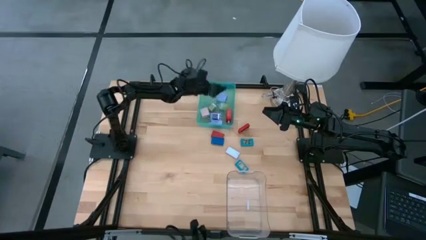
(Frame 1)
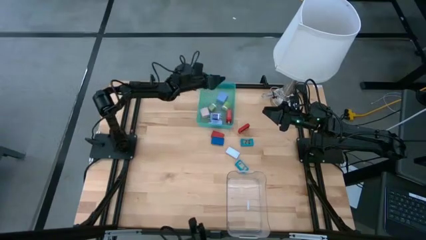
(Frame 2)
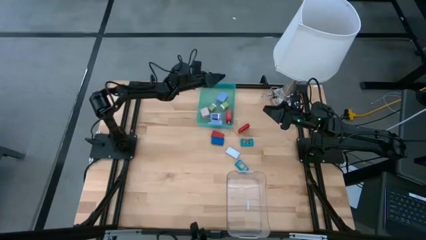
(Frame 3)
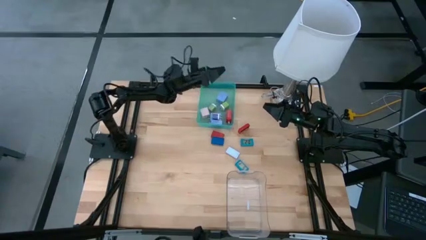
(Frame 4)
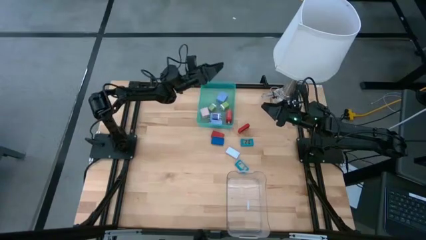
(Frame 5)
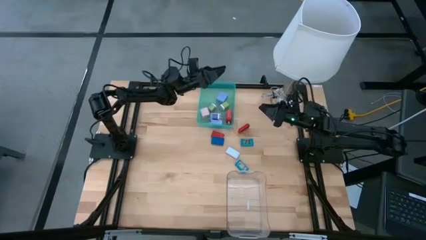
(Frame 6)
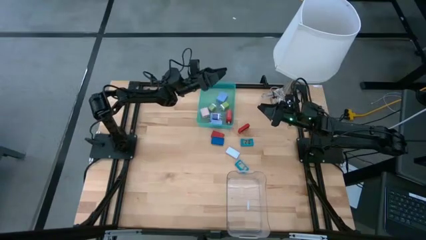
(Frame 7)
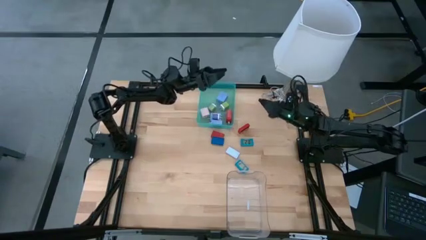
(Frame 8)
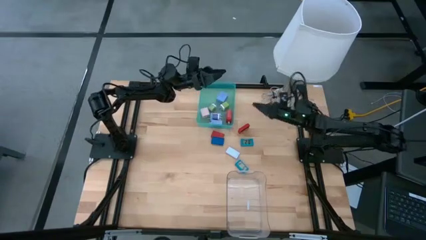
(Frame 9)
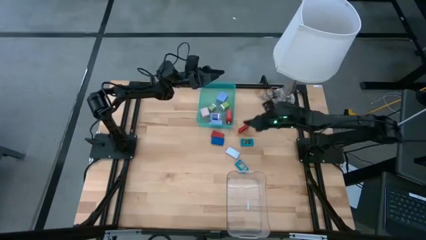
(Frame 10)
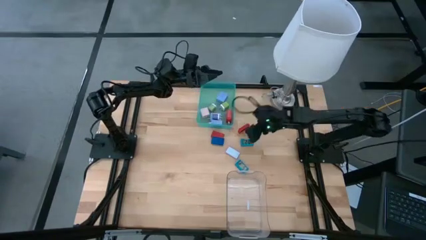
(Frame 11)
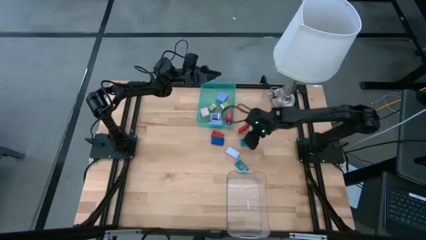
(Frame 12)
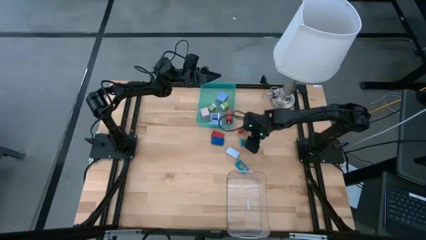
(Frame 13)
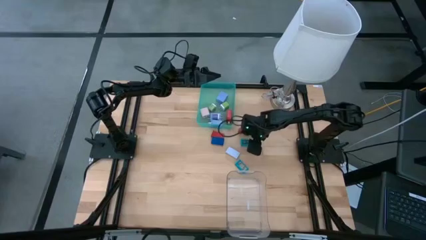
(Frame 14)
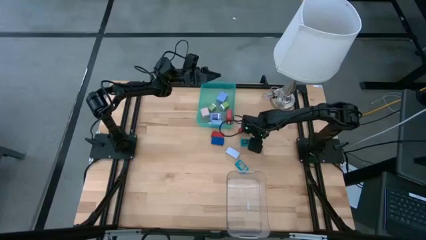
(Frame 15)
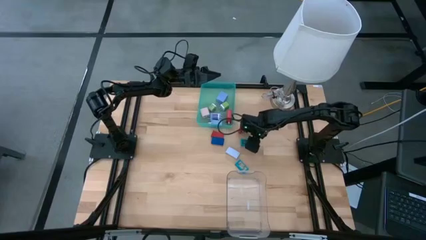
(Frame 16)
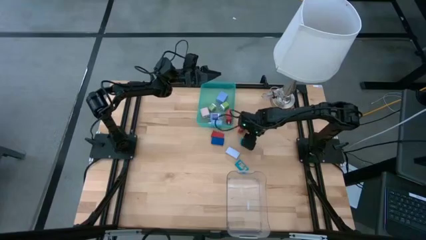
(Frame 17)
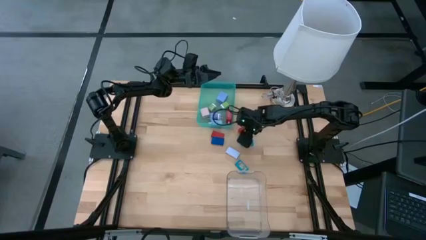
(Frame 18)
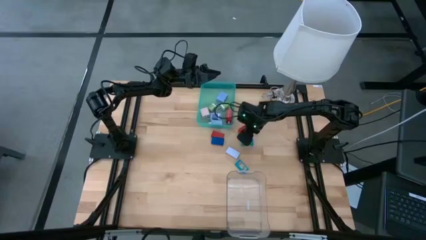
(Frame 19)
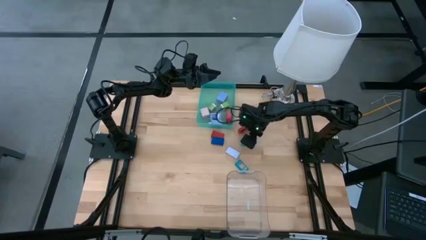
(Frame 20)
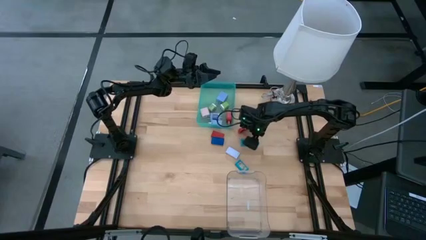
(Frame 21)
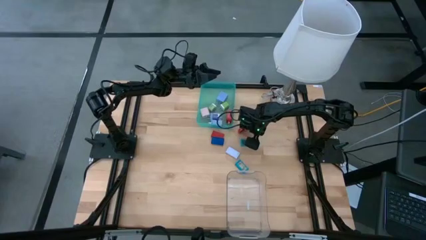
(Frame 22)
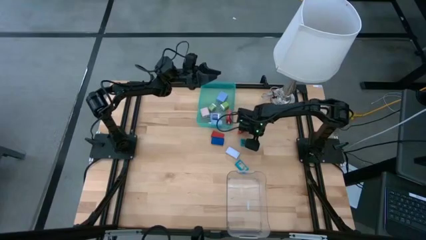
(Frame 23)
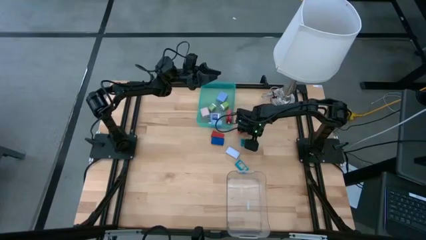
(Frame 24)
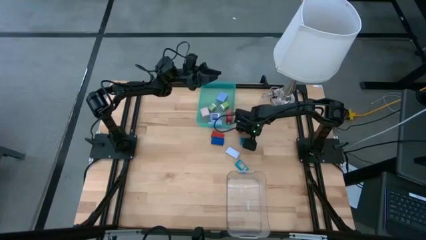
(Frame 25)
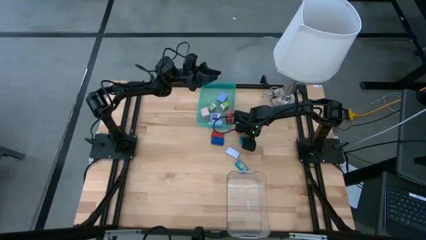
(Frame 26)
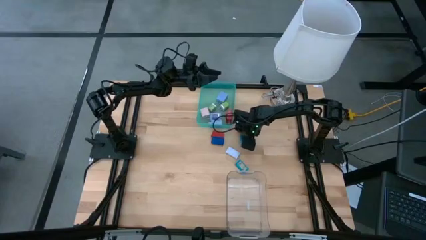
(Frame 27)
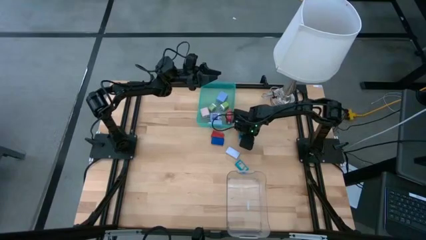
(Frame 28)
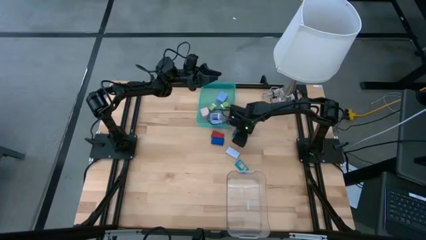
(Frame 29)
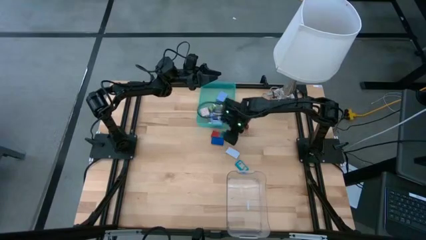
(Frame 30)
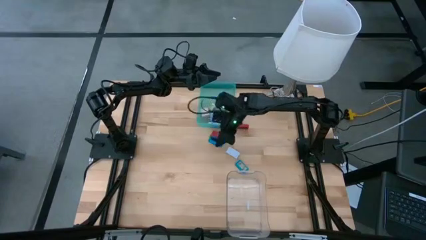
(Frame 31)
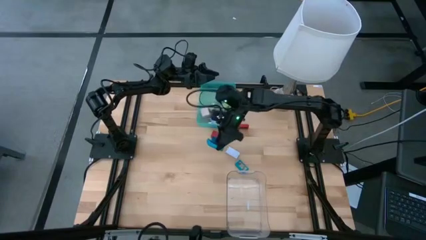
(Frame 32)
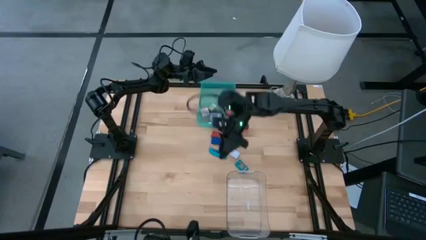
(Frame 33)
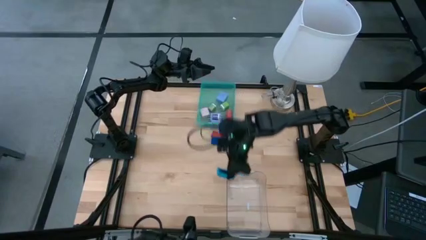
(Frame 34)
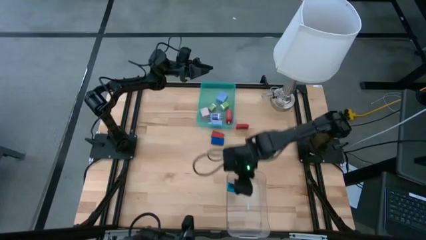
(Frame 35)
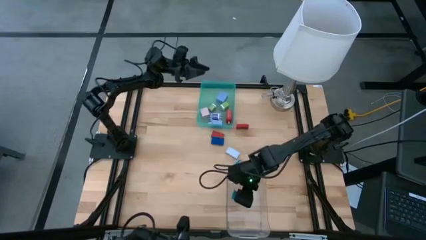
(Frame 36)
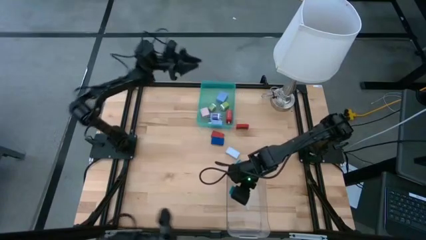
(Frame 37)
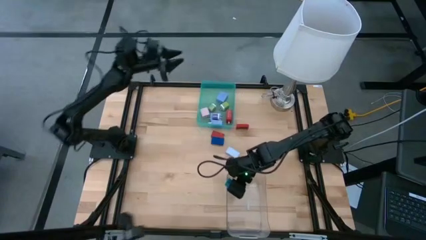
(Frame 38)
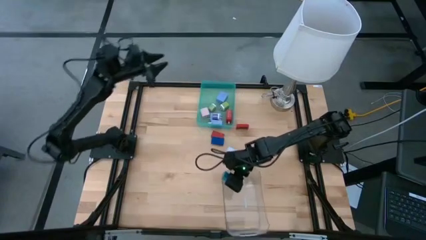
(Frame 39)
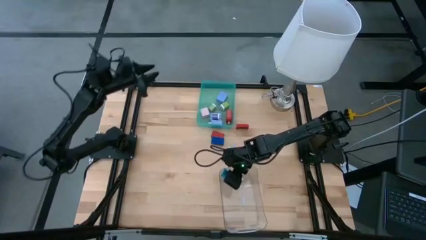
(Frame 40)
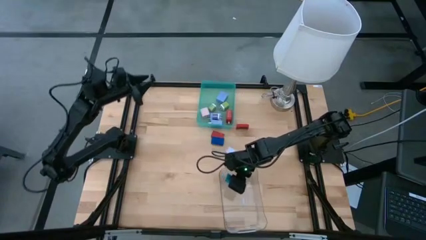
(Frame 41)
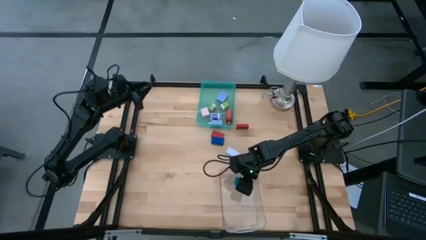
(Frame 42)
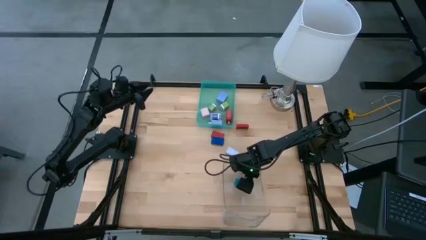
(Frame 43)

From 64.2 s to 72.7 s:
Task: Pick & Place Office items
Put the top blue digital timer into the transparent bin

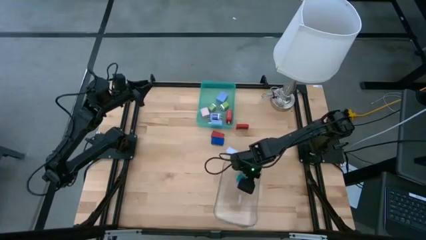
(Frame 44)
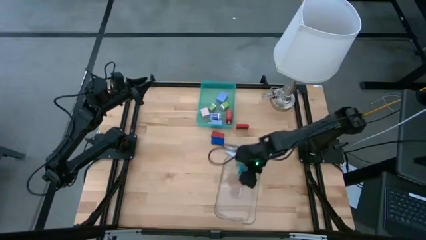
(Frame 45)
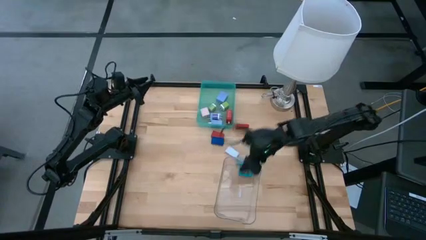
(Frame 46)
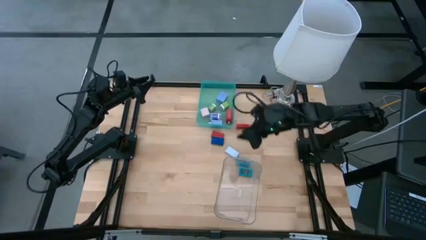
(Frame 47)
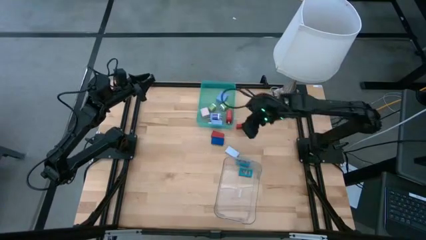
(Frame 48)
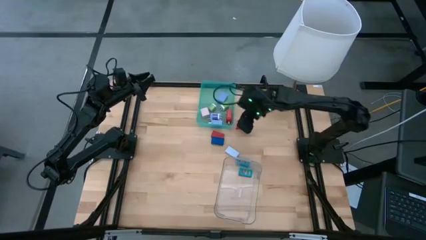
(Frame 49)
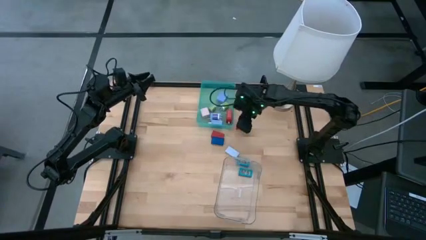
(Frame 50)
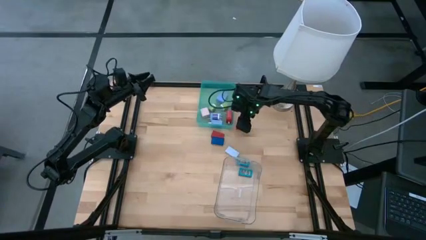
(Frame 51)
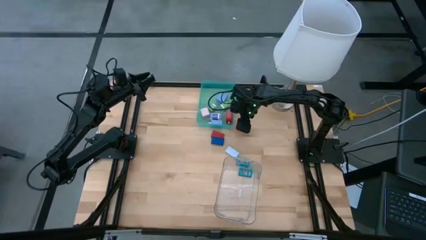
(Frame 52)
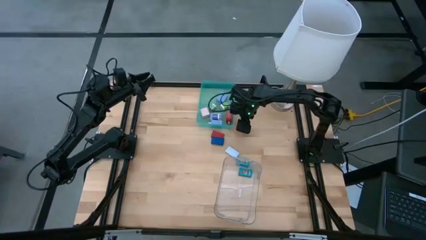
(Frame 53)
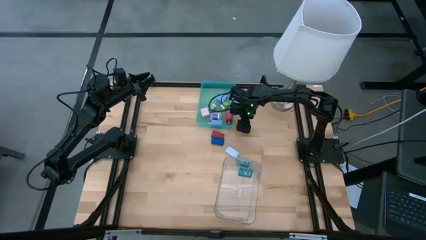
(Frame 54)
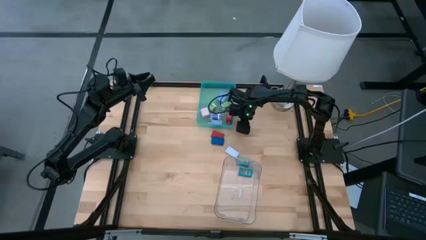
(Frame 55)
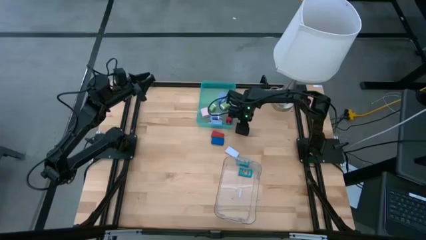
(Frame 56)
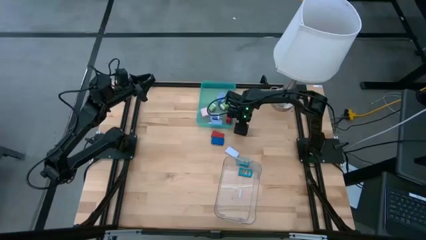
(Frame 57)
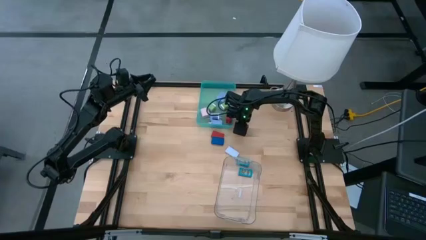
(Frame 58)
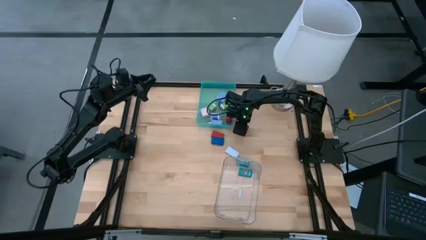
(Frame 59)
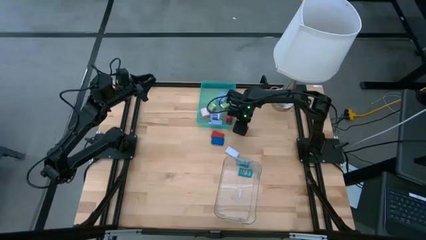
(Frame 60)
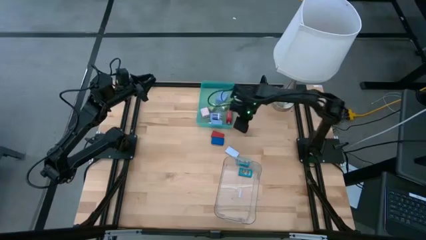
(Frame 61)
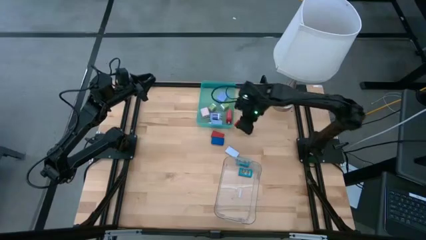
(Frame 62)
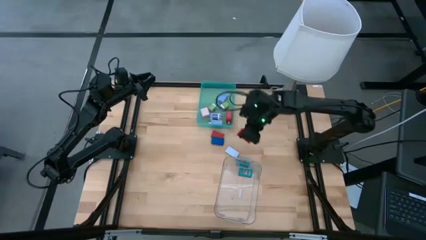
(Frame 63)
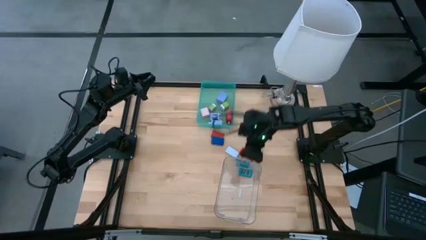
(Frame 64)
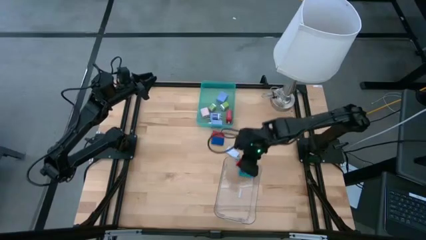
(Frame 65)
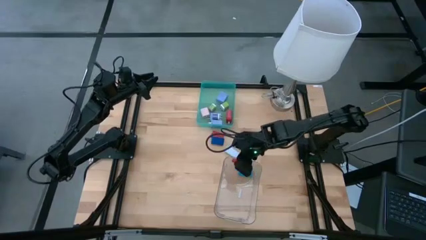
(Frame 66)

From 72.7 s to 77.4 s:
Put the top red digital timer into the transparent bin

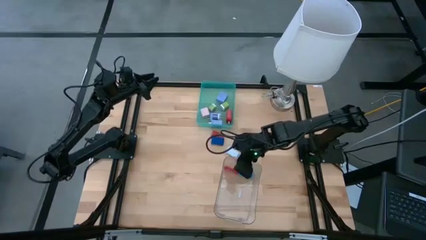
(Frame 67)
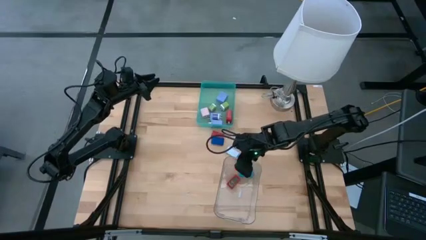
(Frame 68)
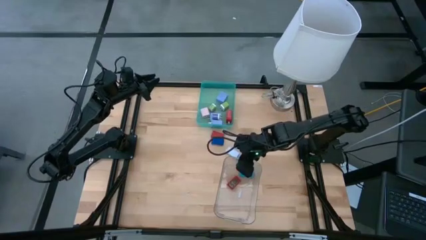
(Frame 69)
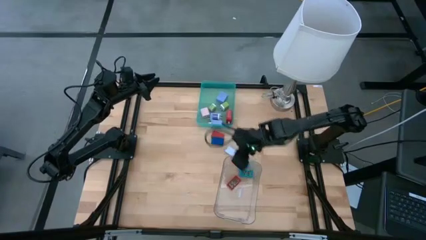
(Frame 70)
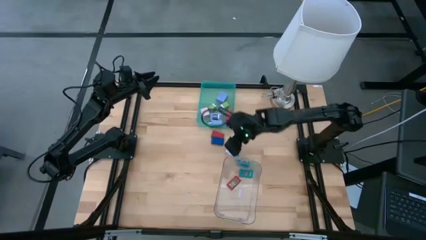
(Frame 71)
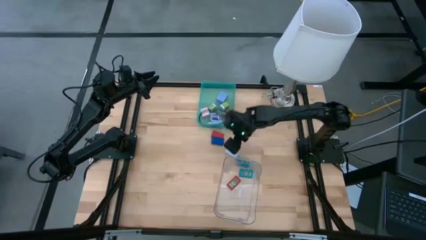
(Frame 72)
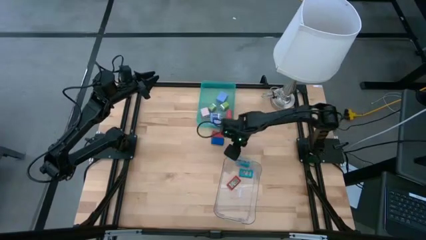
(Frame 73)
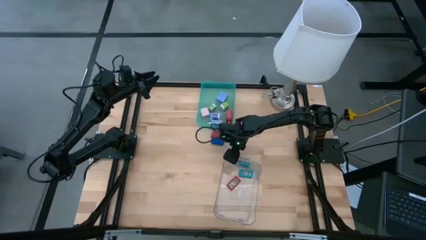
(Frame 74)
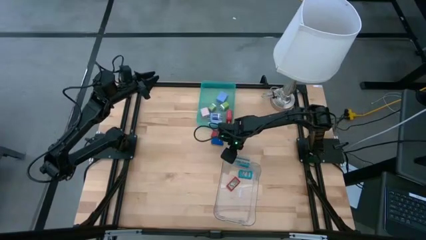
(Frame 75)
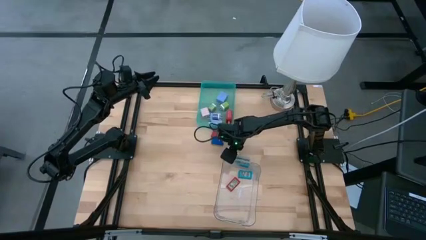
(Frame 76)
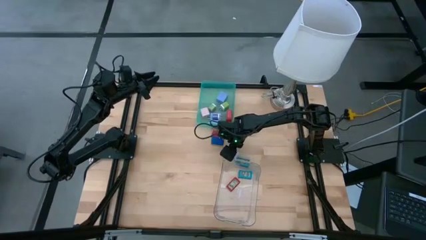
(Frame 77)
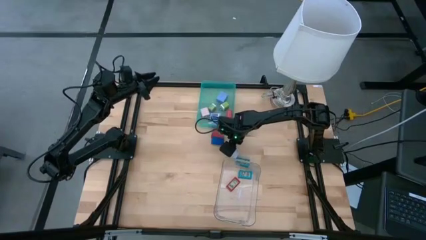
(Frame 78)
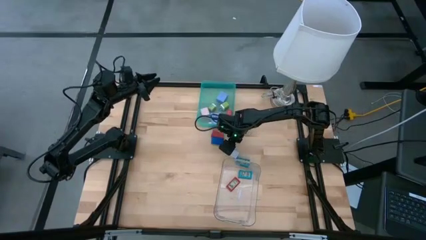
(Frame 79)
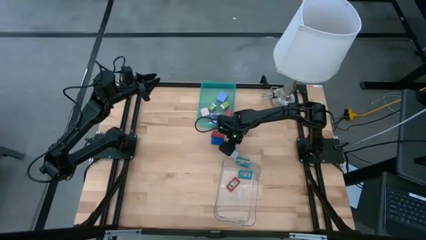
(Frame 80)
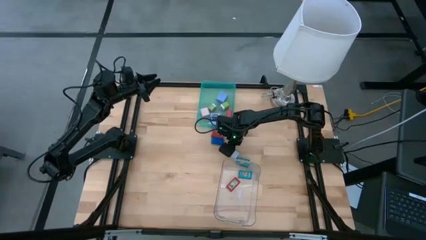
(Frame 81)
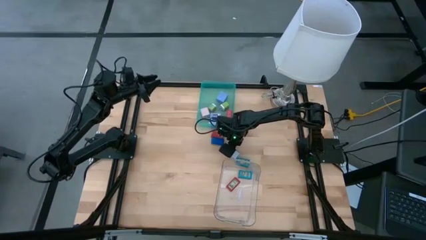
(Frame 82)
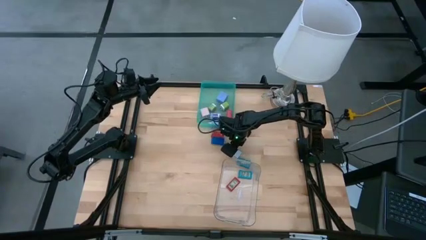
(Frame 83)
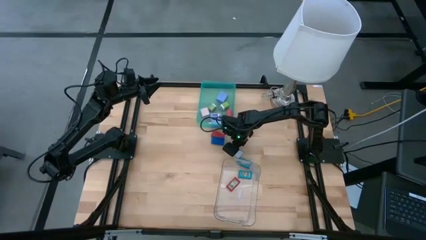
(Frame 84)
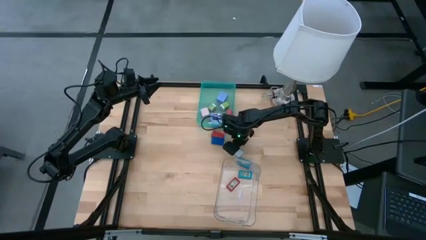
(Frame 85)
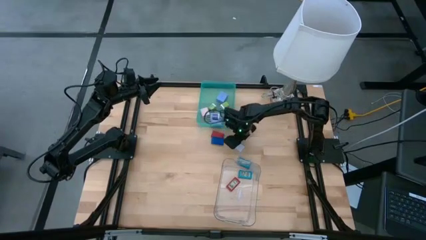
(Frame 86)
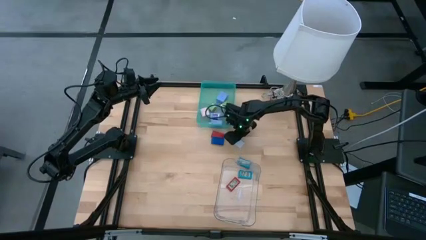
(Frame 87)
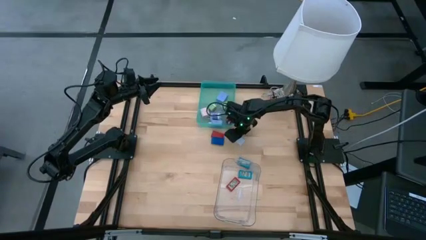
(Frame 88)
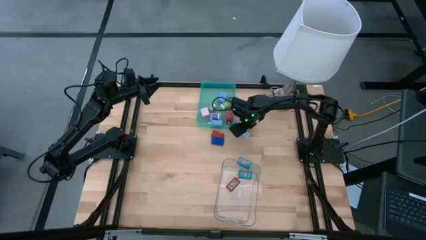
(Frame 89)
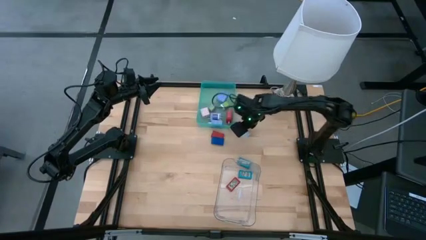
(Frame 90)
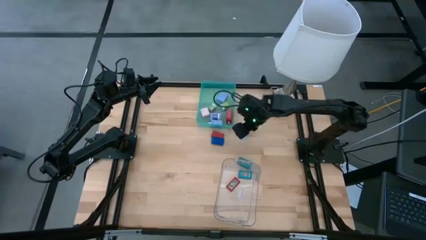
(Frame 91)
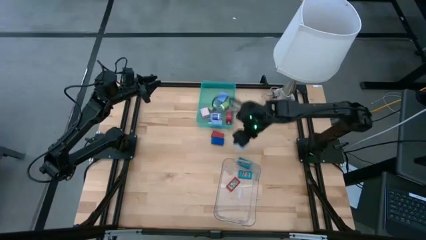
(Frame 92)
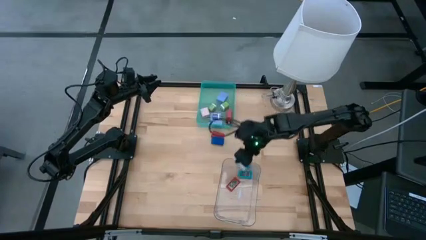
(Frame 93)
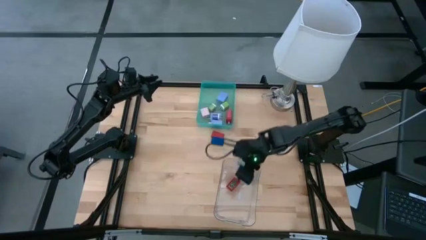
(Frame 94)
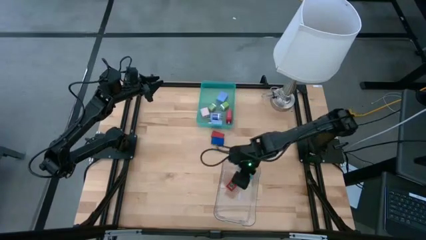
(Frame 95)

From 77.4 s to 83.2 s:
Put the white digital timer into the transparent bin
